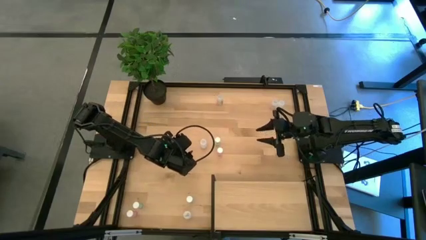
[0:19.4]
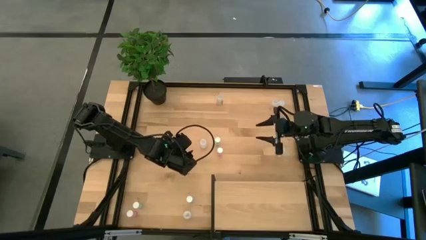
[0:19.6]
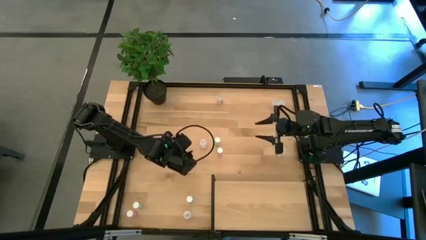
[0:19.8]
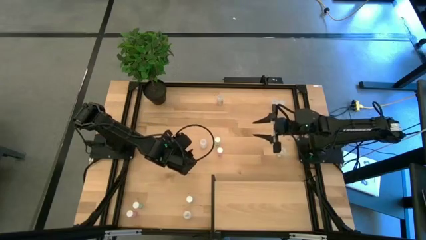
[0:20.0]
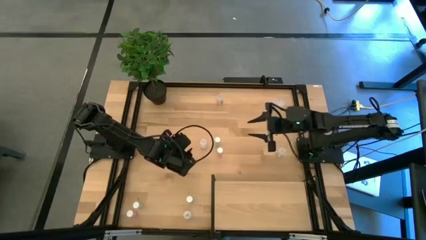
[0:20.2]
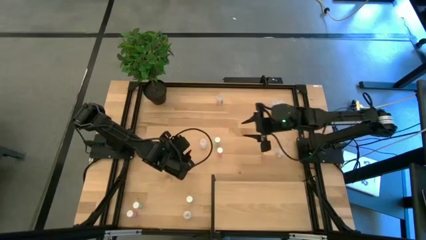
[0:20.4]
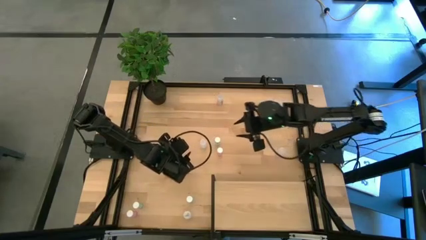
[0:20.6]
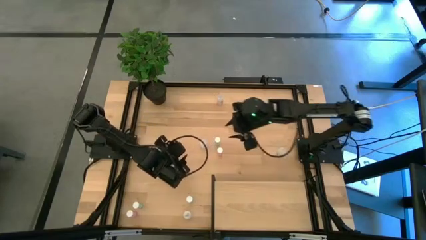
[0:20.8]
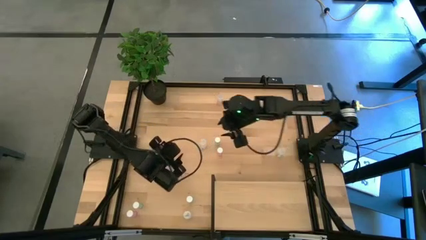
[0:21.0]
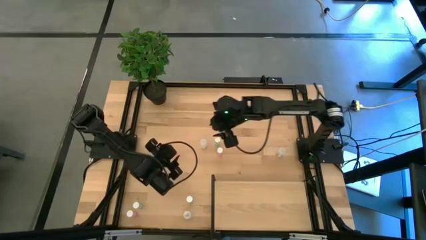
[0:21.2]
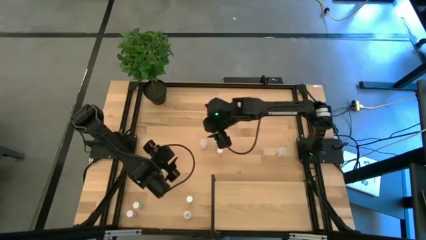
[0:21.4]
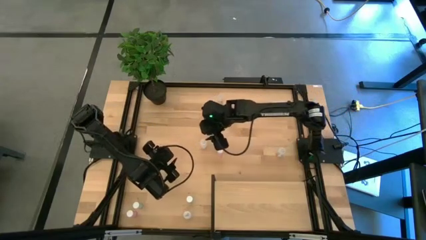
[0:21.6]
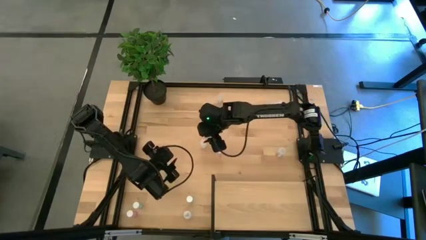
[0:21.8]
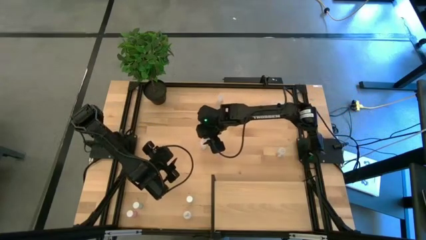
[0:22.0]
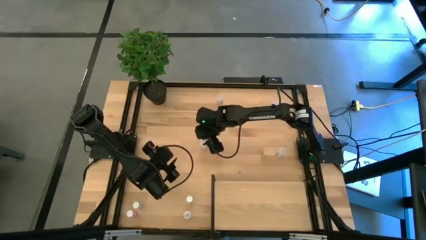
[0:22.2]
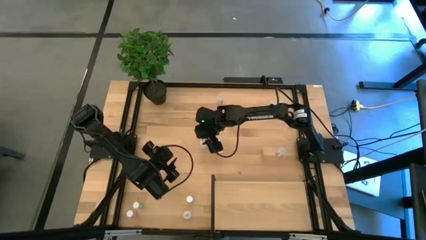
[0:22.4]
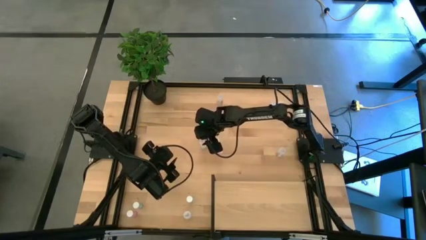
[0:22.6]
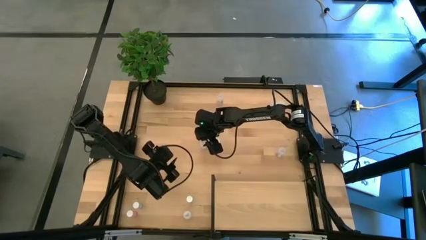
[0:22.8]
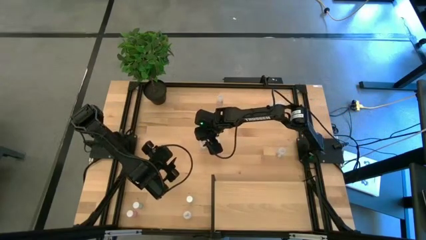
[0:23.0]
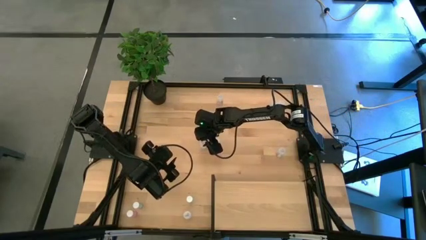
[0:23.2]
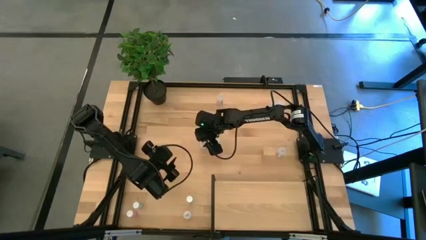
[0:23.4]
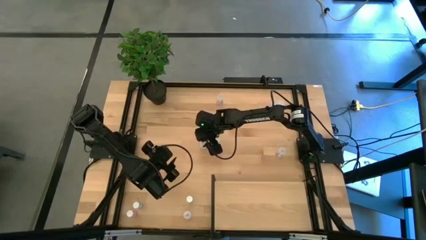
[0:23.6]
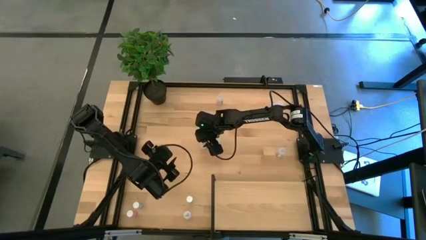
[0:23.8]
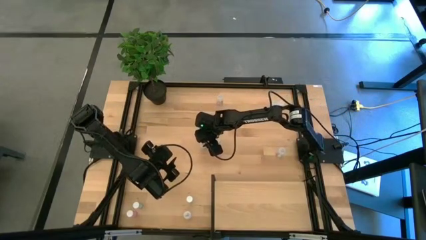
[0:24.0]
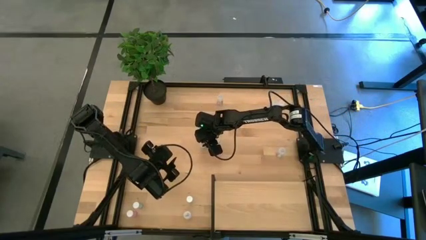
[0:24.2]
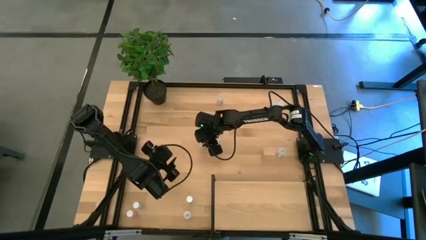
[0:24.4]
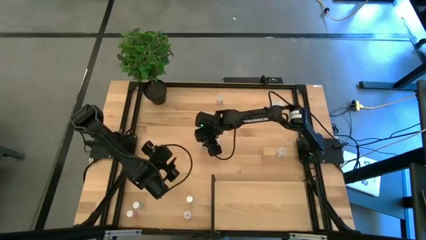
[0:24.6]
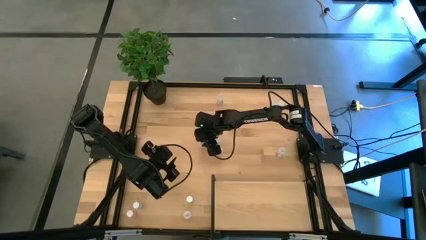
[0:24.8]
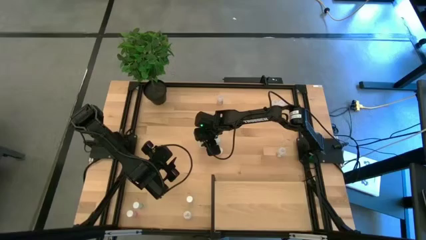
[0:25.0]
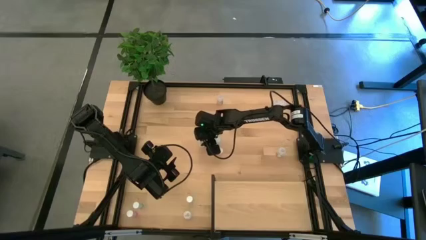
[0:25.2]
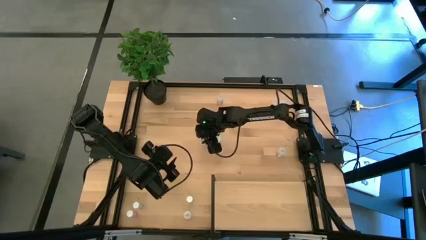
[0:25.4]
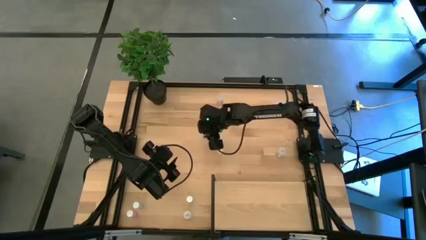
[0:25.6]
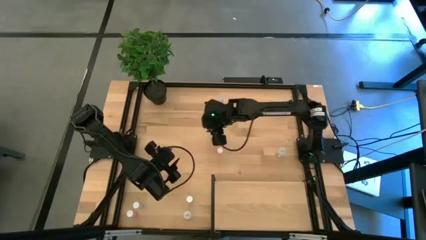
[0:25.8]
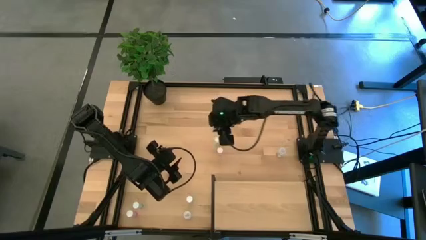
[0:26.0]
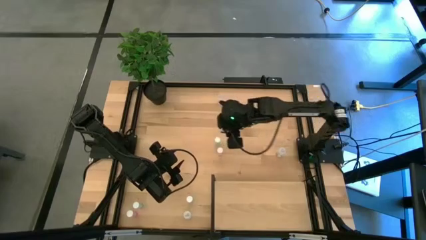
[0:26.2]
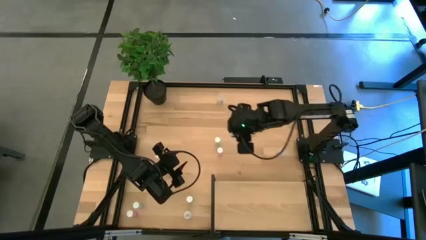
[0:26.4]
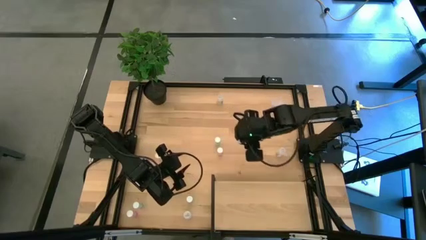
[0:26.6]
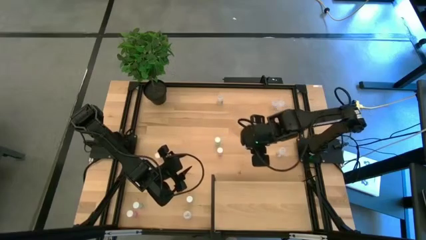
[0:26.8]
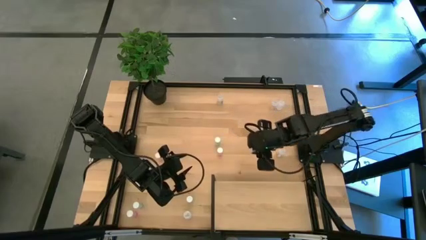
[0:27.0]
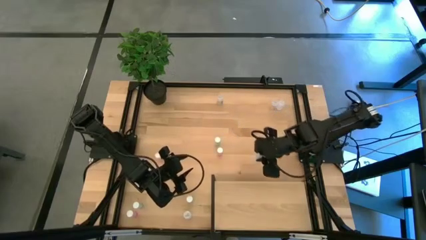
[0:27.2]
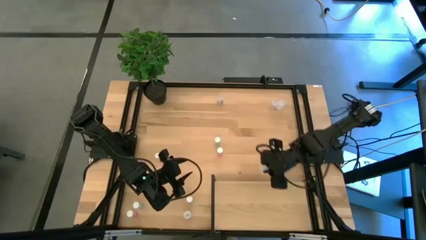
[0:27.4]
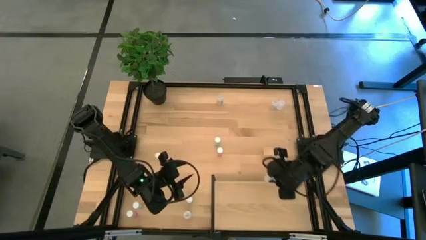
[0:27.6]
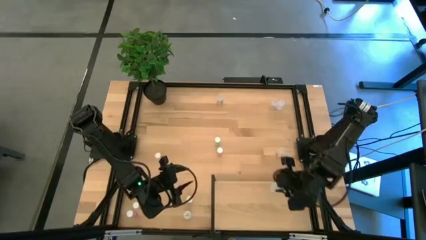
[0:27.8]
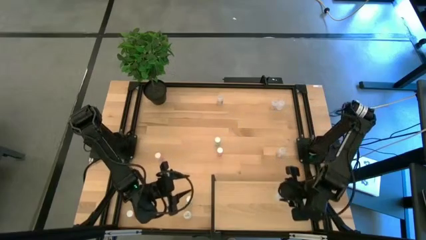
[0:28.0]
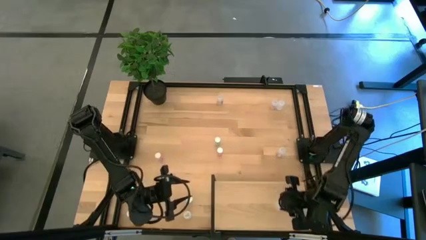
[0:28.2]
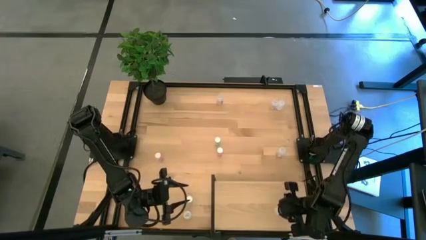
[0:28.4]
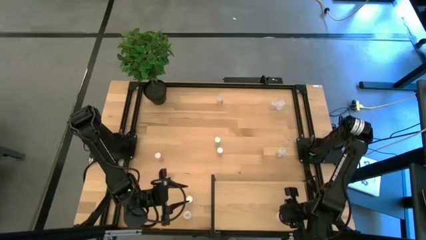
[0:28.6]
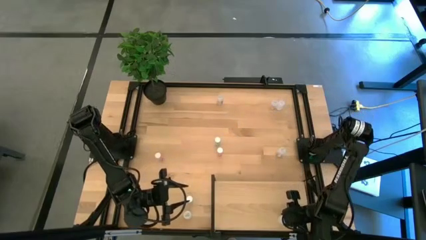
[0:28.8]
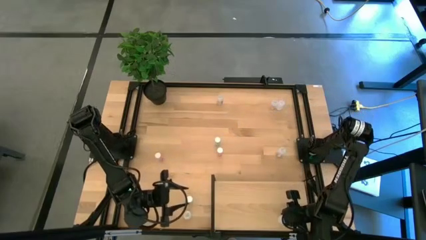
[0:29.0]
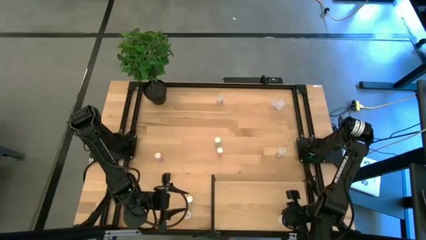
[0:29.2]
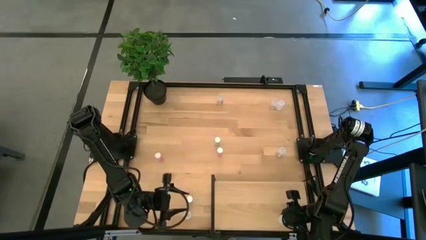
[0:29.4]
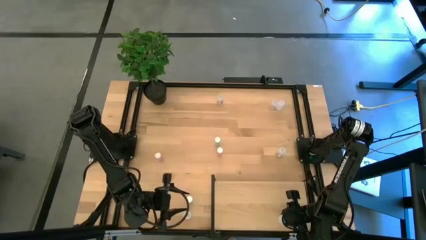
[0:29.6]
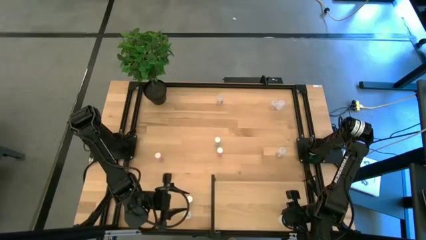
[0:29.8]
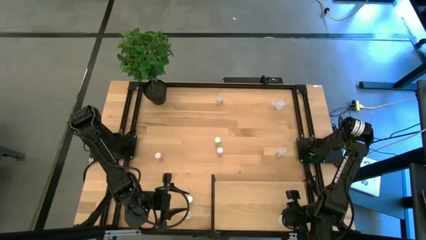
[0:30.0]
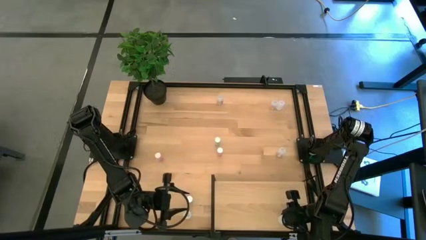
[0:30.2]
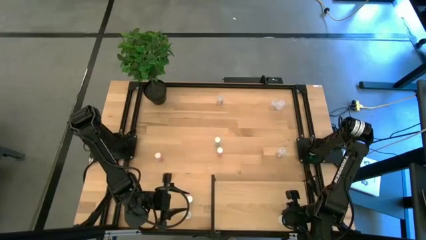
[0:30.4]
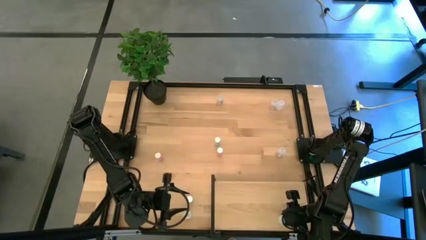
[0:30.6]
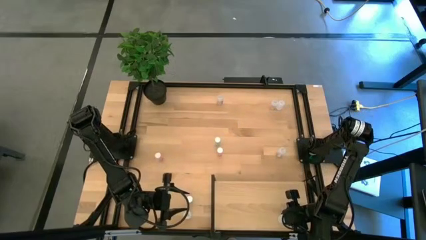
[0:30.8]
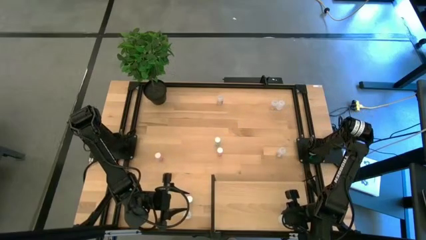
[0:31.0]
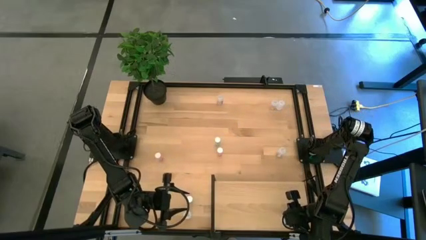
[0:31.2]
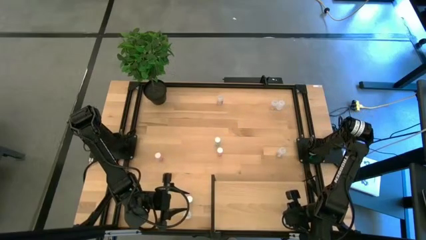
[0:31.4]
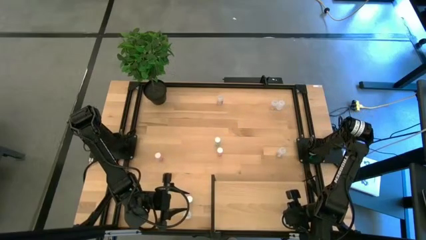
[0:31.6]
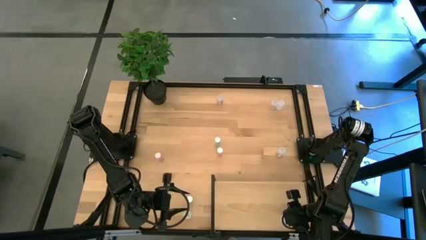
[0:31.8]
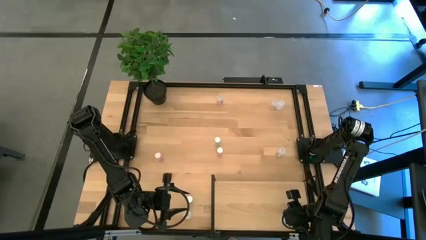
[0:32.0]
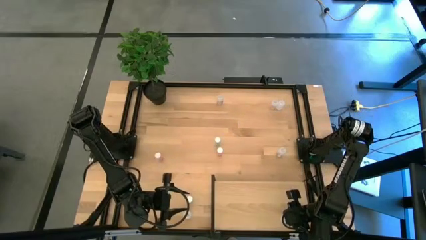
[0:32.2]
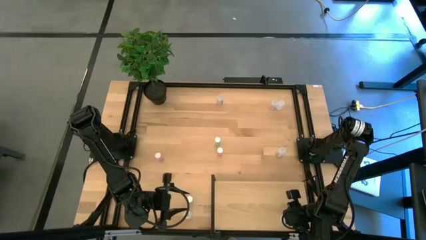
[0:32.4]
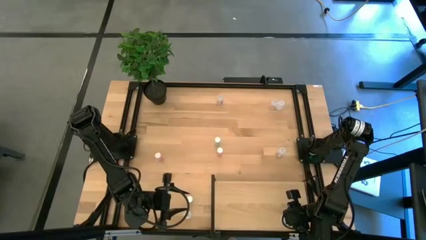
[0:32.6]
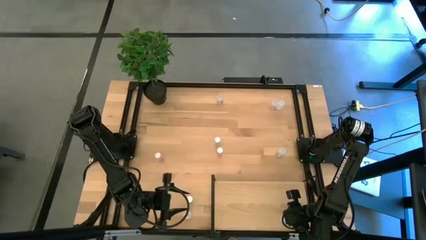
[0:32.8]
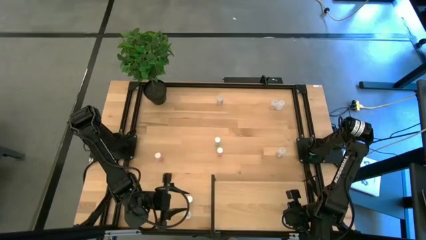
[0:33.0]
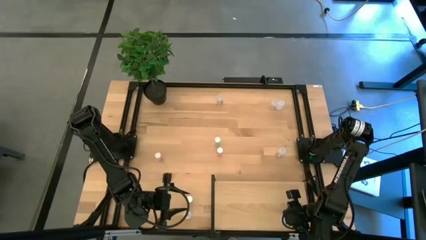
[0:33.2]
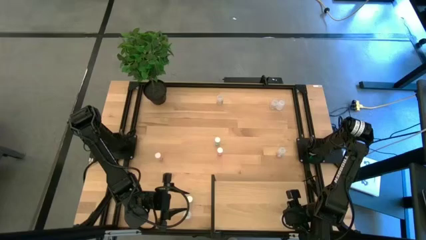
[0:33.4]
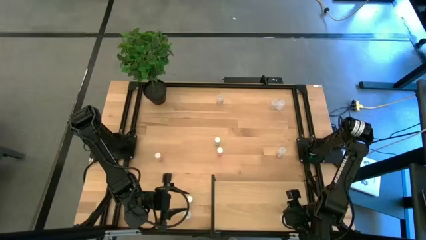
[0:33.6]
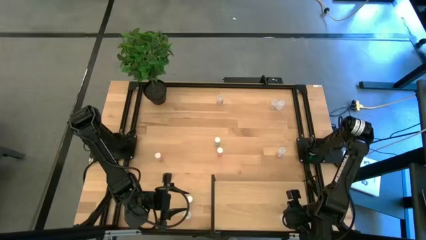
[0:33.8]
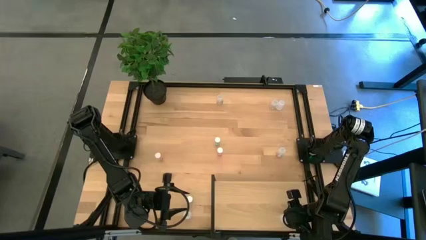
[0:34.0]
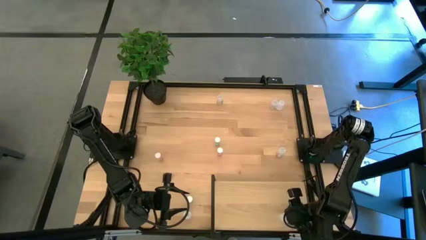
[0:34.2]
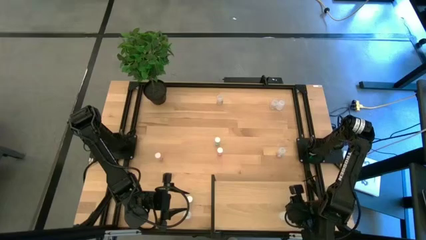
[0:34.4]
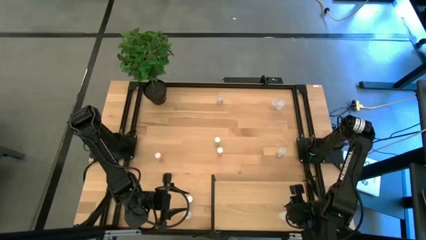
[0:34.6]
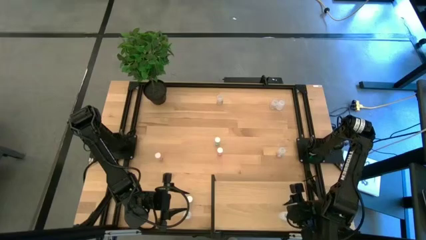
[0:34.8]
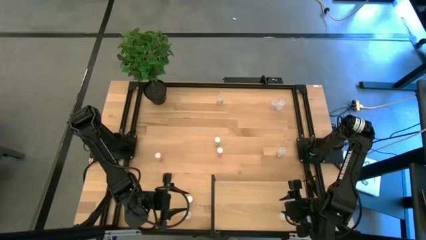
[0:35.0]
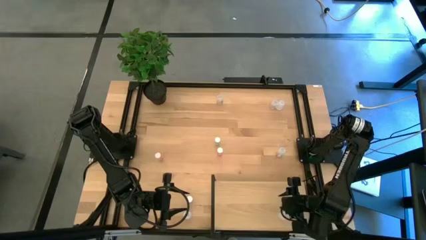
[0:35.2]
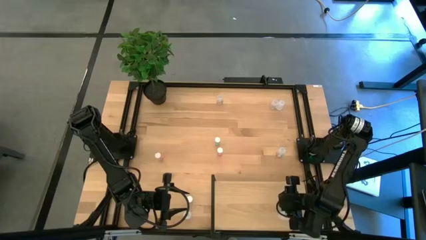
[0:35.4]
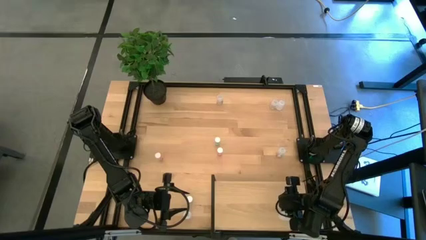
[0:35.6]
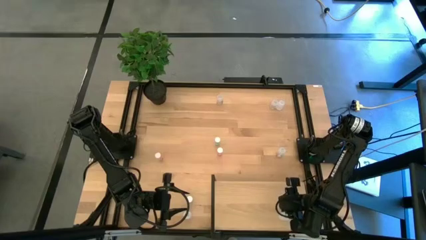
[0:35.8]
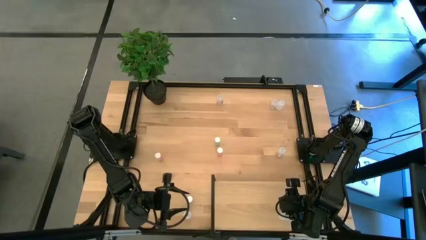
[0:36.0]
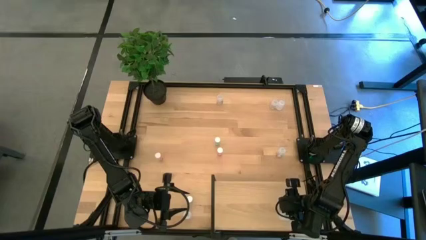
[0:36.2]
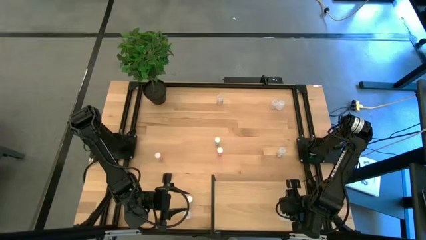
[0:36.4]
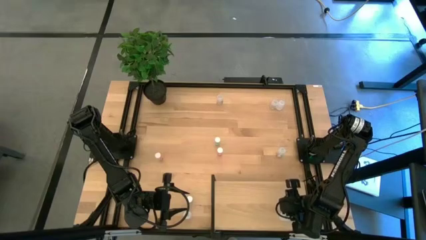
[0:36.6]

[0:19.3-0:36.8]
Task: Pick and place medicine bottles onto shelf by color
Put the left white pill bottle on the shelf
